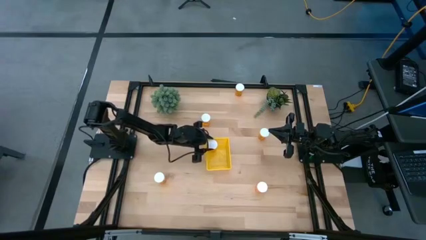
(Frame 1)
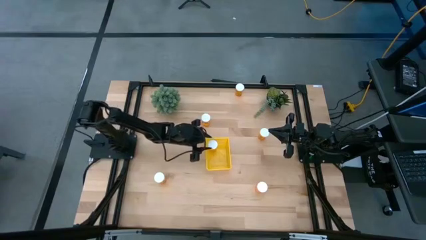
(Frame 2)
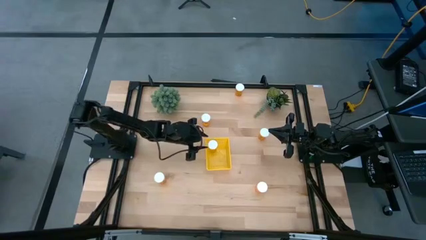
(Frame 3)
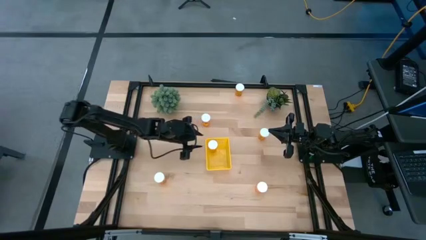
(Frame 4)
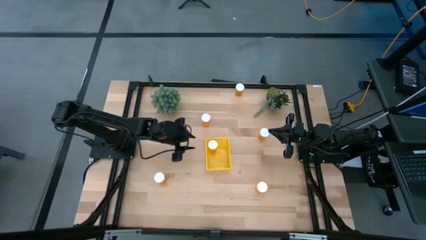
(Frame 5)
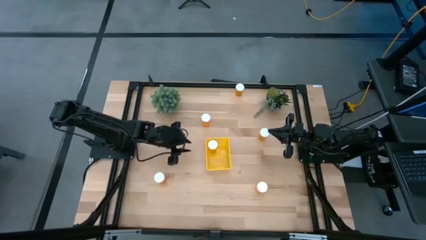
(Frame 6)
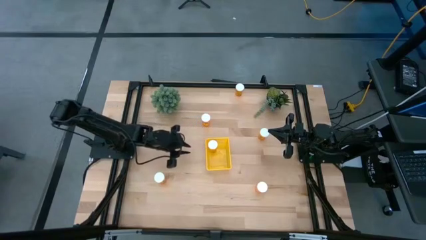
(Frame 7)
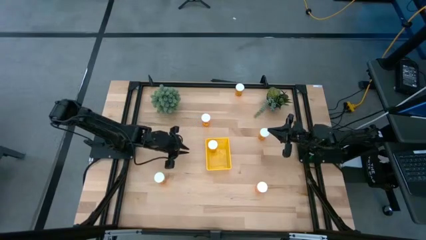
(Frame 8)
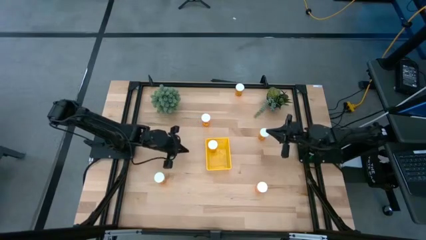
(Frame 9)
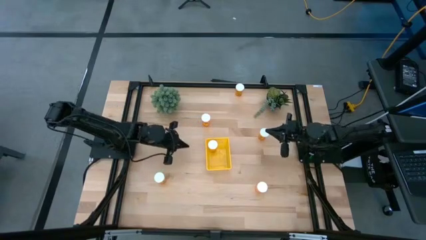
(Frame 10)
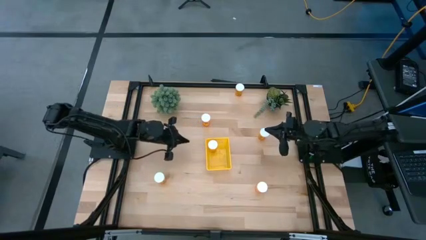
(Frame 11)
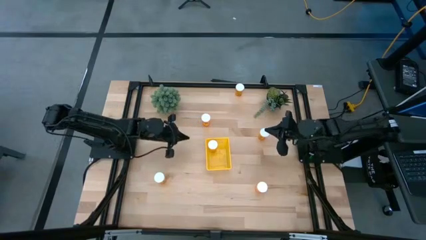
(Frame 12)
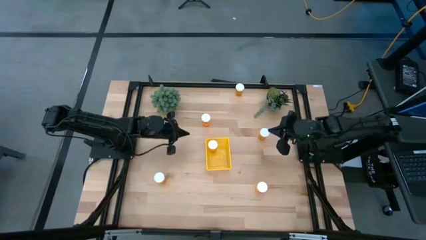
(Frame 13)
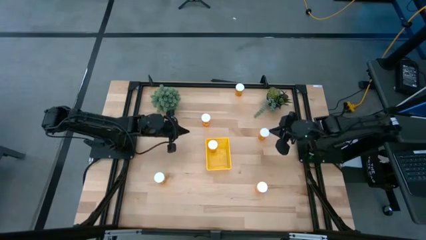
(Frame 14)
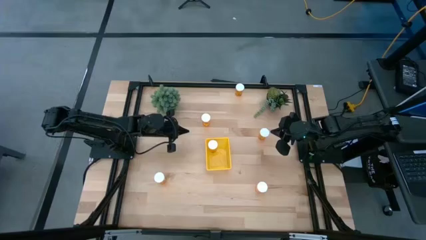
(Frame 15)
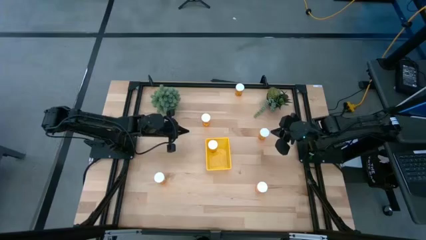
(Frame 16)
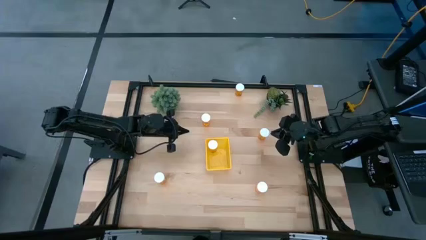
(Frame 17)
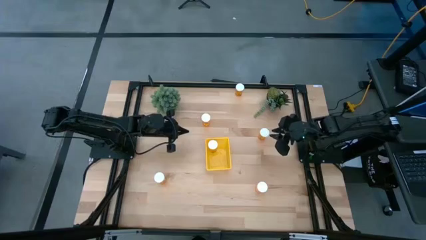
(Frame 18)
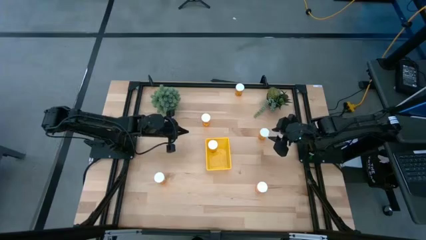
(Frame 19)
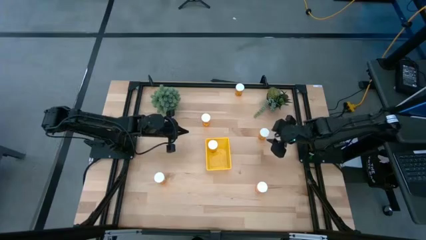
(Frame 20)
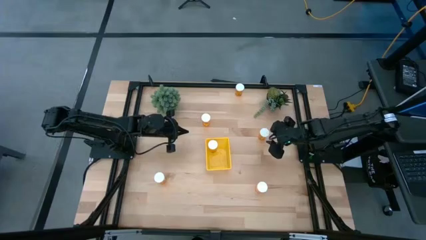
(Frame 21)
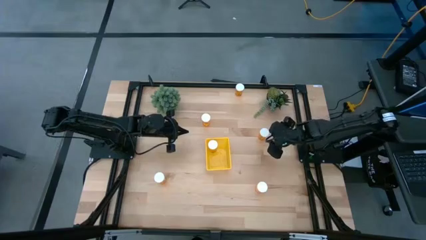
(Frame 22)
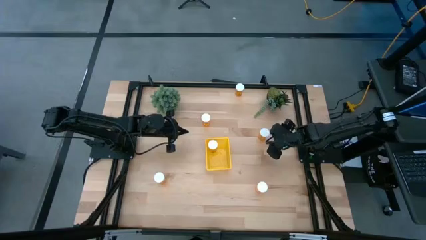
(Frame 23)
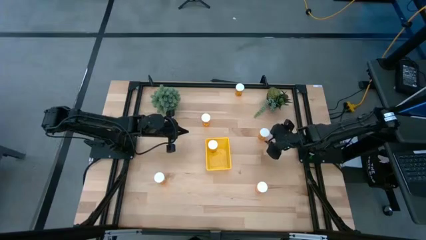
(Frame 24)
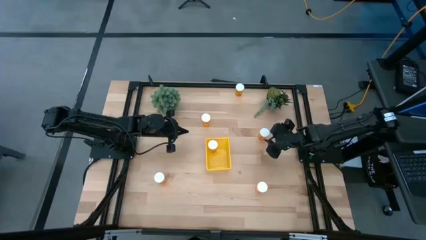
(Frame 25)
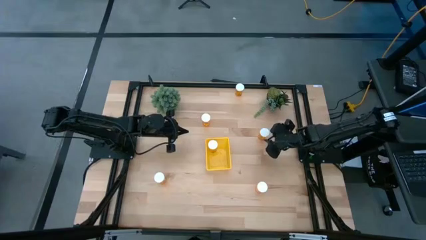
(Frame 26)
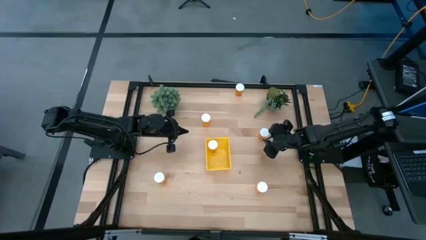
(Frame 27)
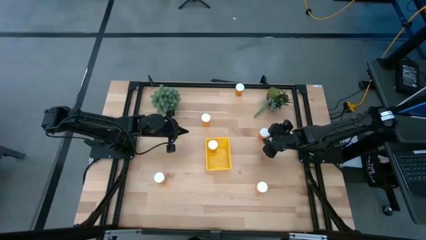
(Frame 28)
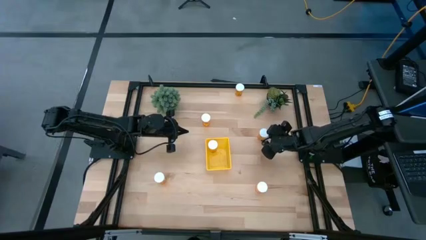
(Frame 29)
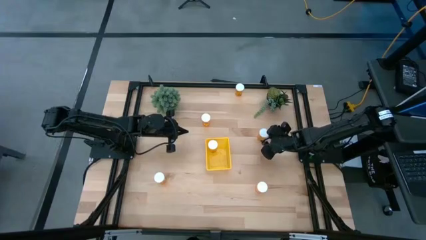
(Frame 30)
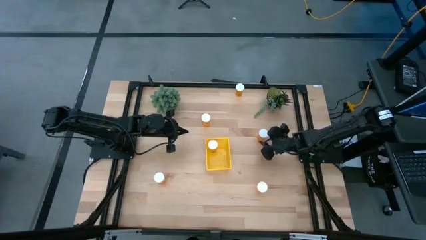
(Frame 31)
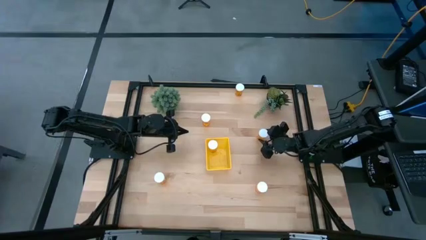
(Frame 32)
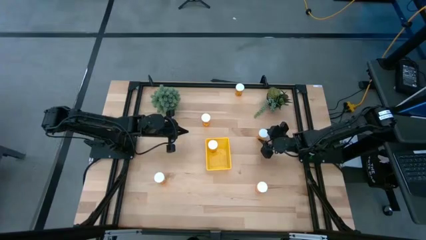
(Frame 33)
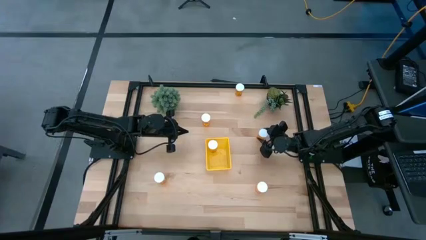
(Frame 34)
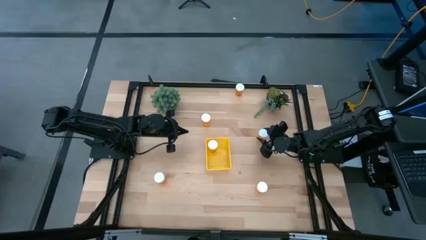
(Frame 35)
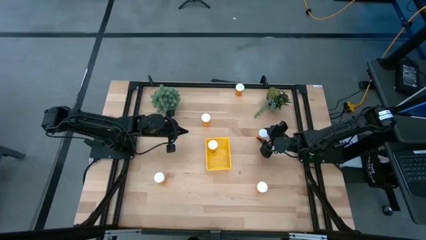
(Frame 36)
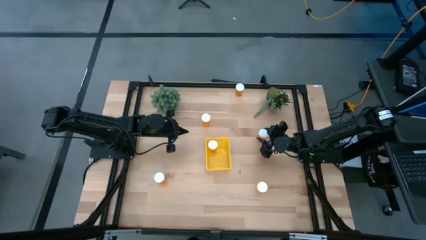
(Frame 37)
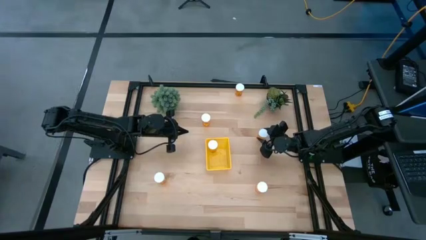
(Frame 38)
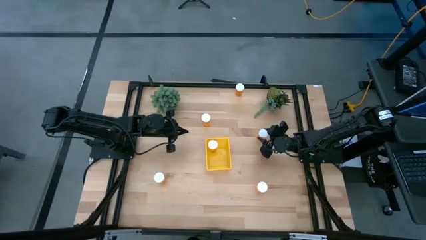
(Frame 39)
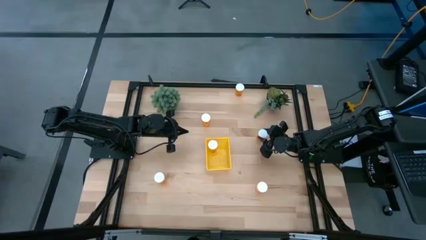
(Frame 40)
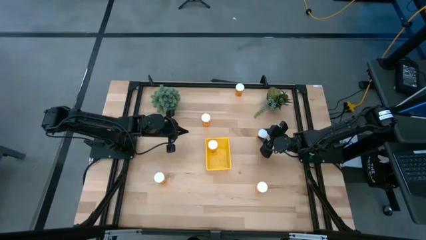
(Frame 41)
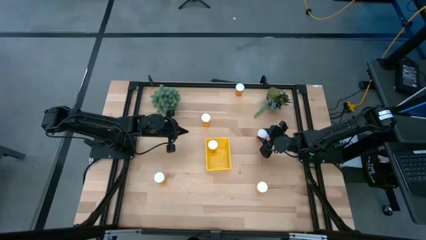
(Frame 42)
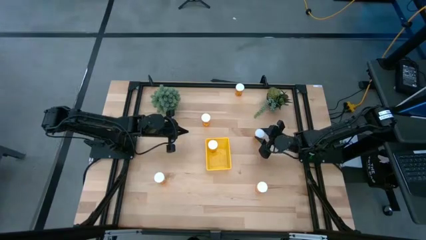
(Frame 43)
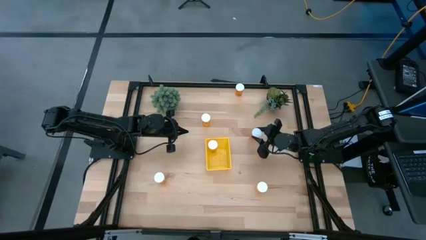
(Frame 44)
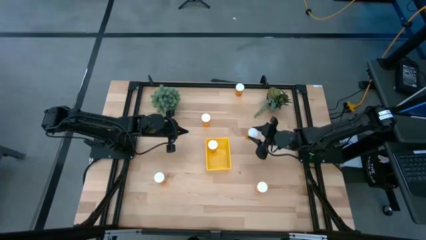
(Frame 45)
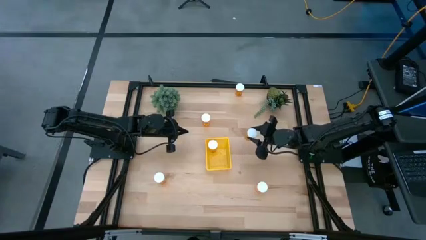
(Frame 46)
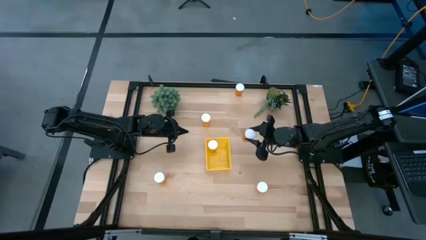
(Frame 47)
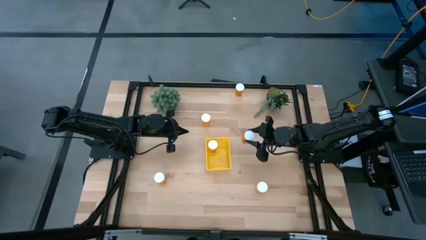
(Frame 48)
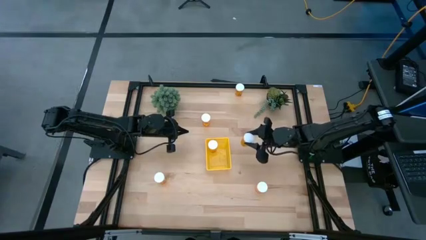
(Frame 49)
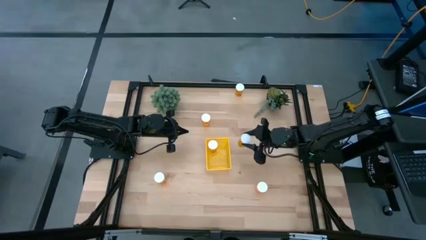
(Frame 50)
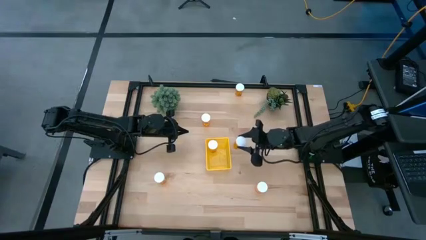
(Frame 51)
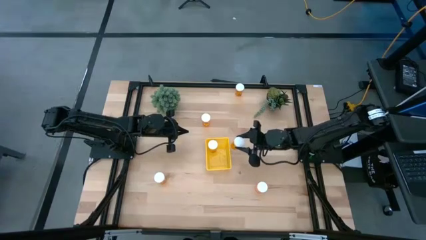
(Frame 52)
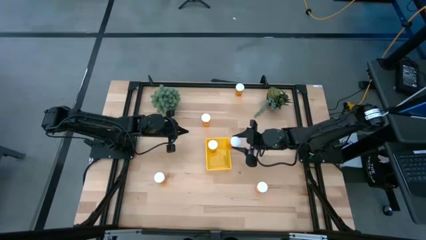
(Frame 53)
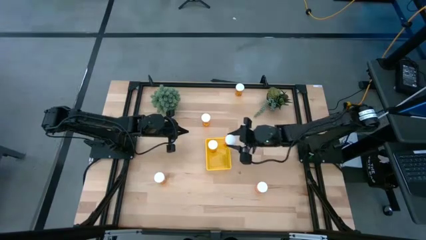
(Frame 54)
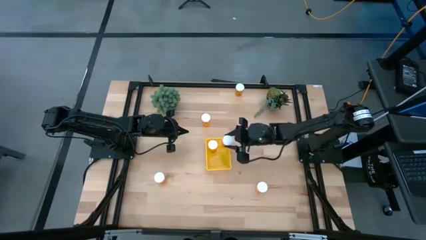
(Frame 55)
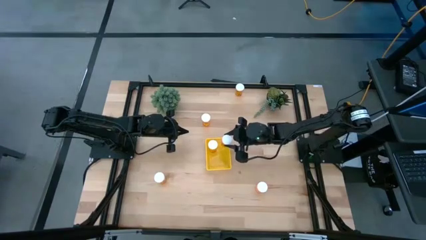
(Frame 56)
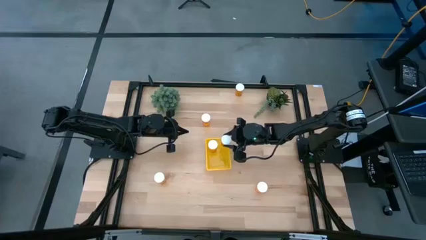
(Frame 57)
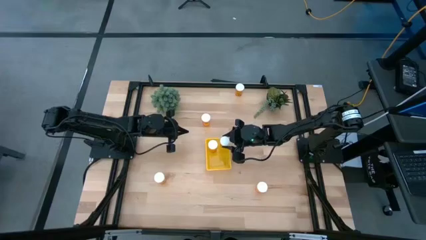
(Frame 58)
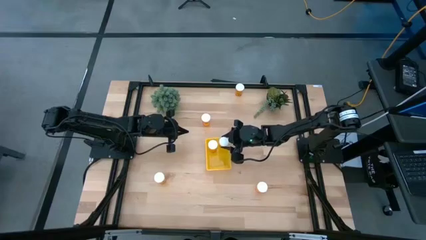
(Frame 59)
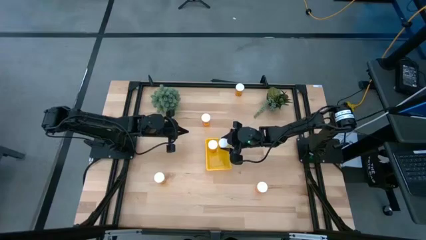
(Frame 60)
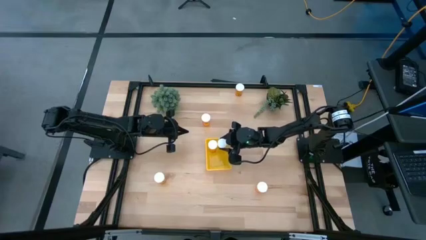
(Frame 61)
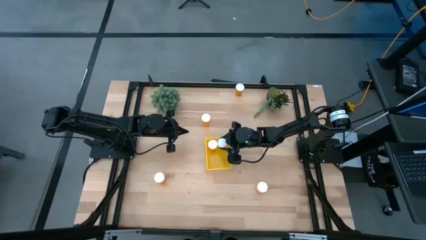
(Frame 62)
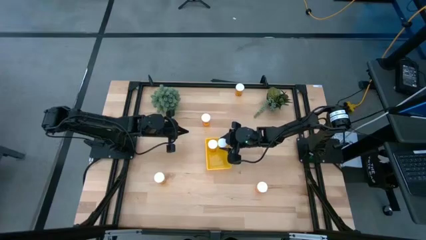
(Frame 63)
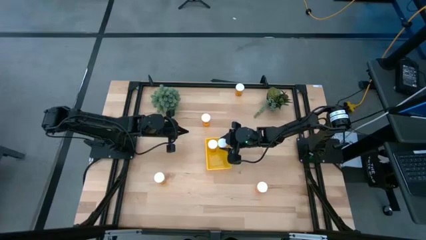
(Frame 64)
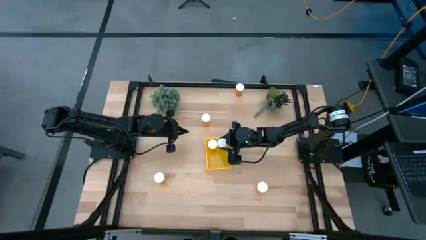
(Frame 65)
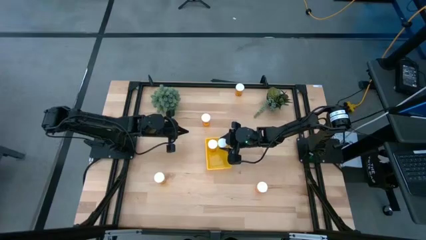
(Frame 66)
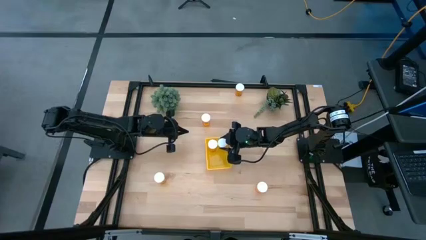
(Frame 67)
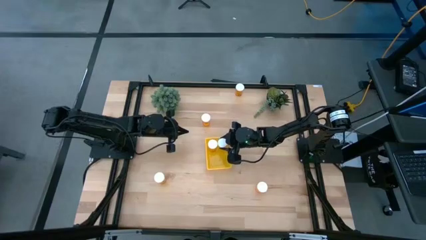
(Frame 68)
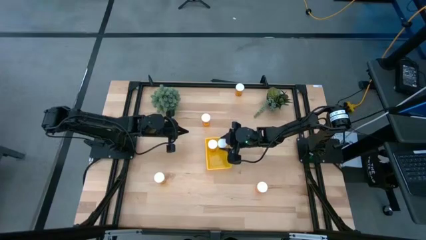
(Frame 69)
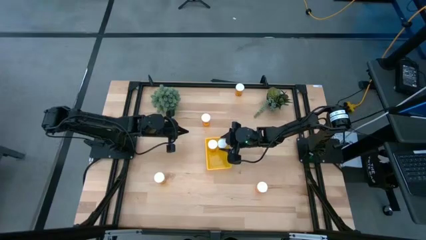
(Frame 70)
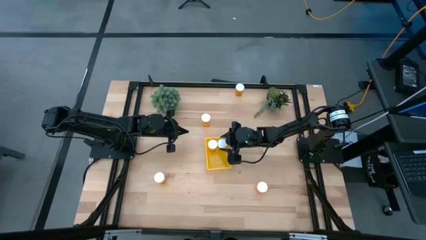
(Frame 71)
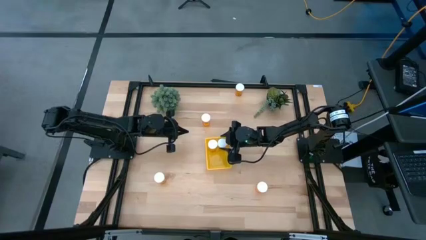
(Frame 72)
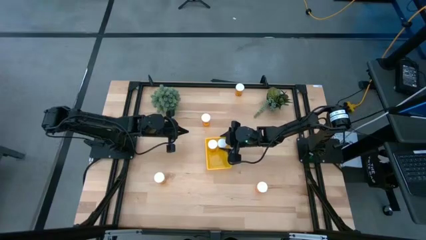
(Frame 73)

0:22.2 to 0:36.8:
Task: Pick and place pill bottles into a basket
Put the orange pill bottle into the yellow bin
